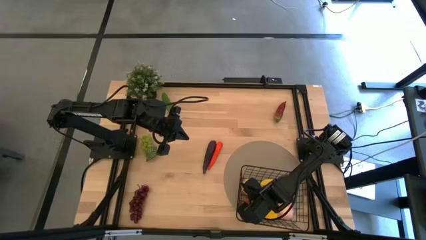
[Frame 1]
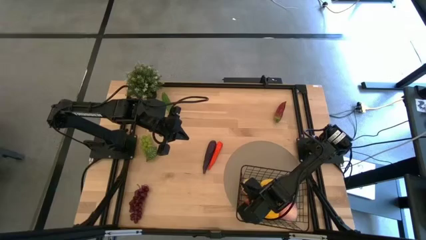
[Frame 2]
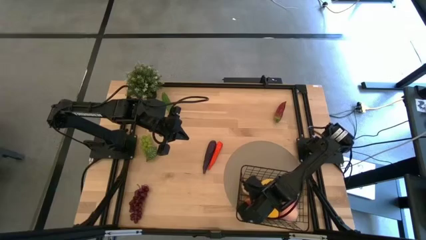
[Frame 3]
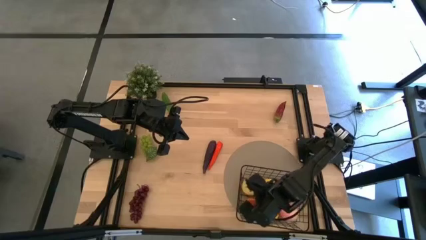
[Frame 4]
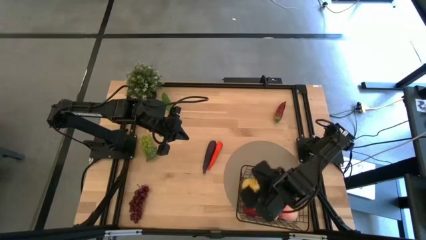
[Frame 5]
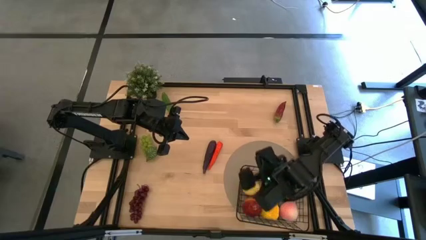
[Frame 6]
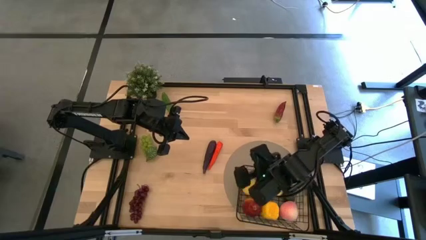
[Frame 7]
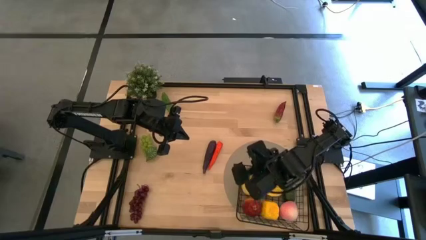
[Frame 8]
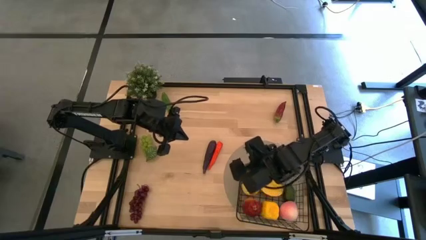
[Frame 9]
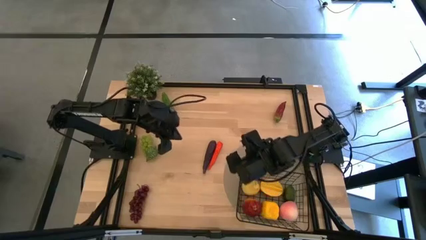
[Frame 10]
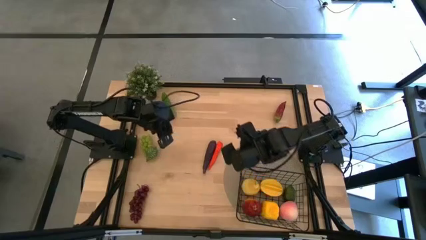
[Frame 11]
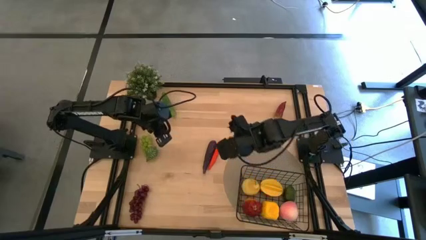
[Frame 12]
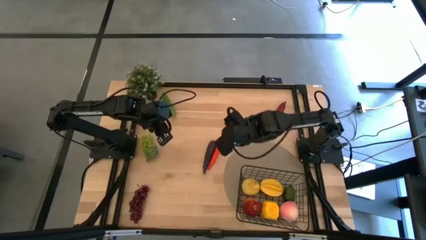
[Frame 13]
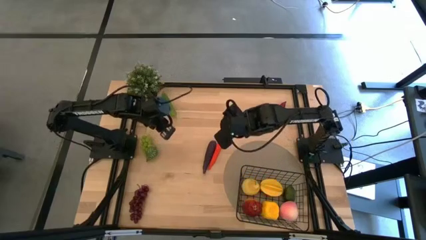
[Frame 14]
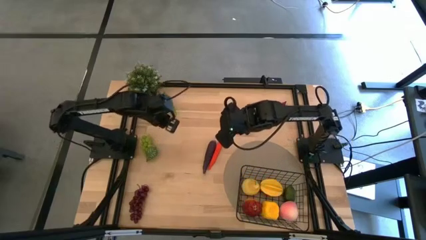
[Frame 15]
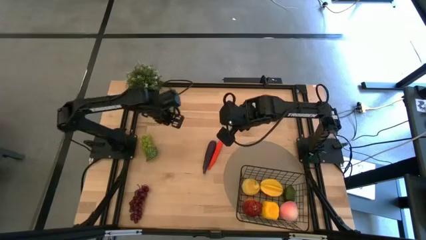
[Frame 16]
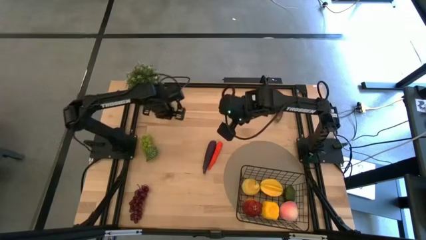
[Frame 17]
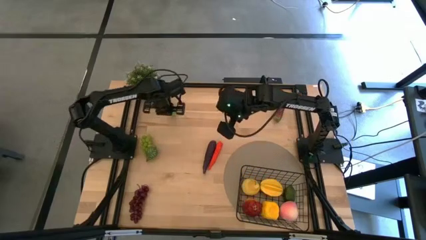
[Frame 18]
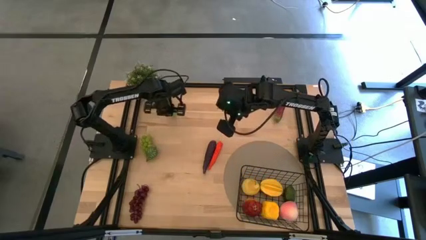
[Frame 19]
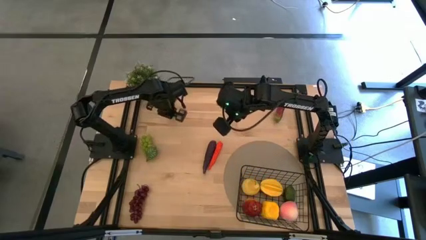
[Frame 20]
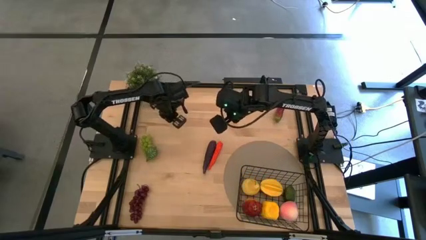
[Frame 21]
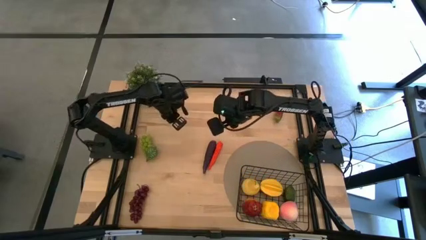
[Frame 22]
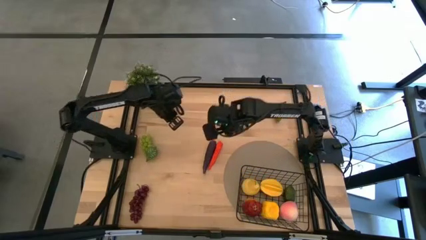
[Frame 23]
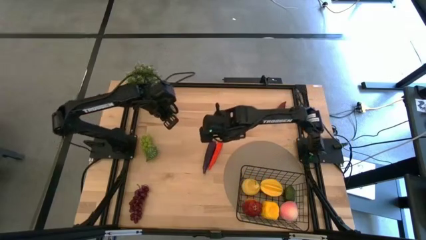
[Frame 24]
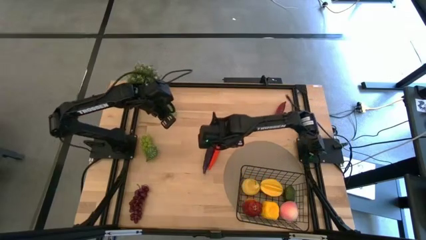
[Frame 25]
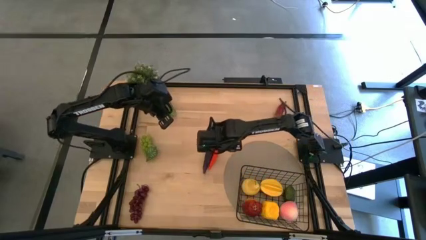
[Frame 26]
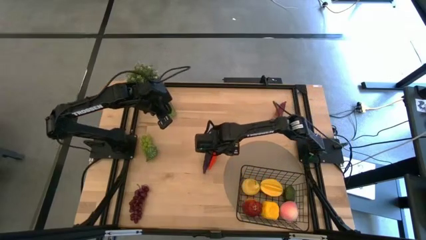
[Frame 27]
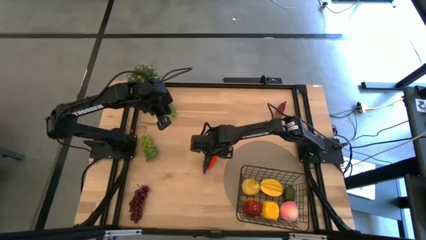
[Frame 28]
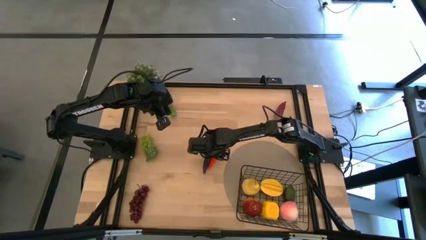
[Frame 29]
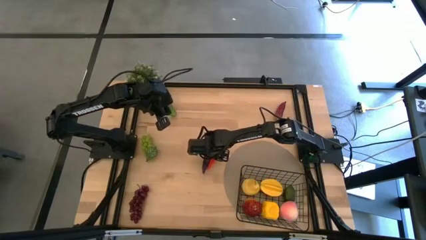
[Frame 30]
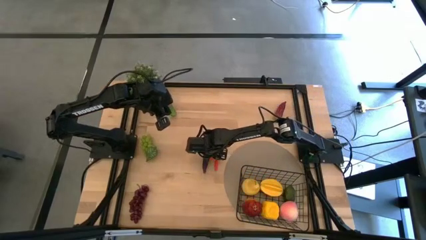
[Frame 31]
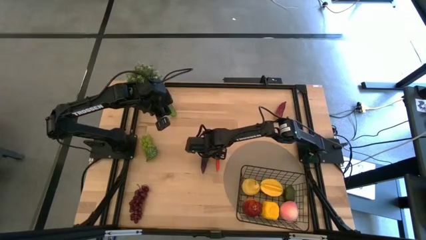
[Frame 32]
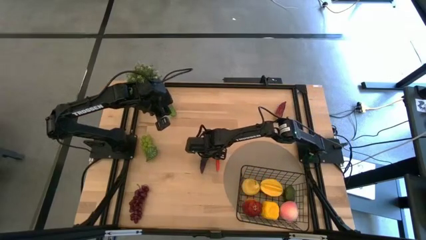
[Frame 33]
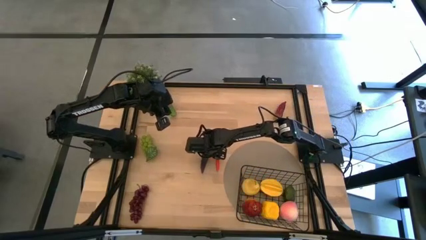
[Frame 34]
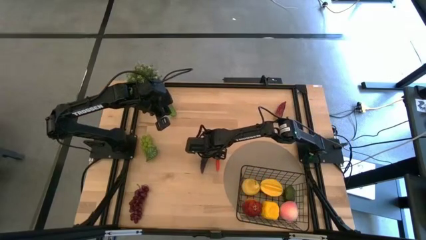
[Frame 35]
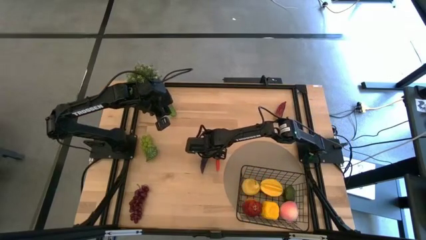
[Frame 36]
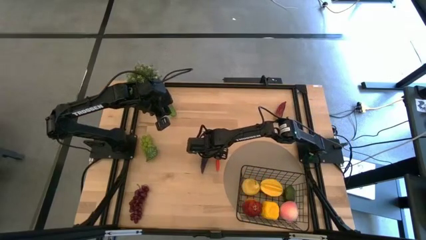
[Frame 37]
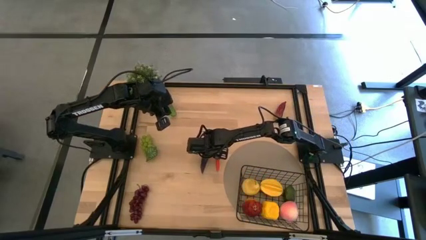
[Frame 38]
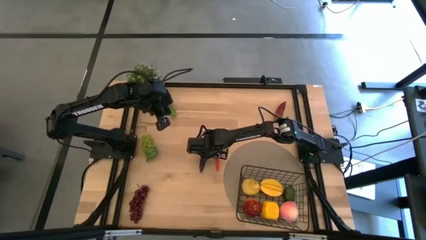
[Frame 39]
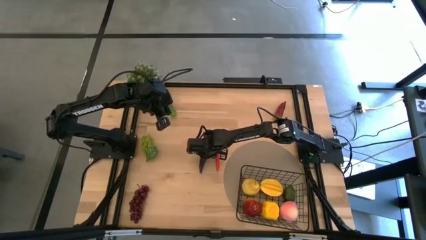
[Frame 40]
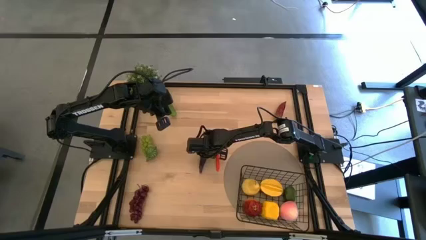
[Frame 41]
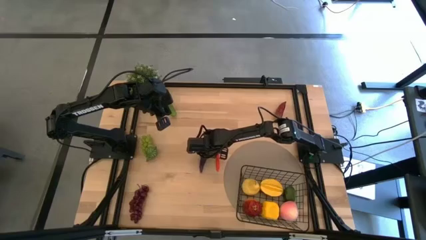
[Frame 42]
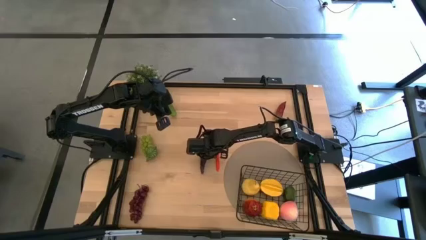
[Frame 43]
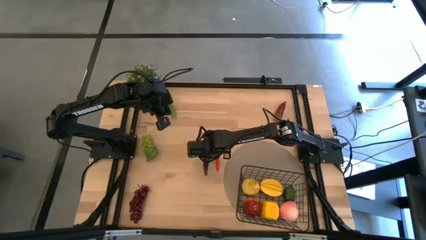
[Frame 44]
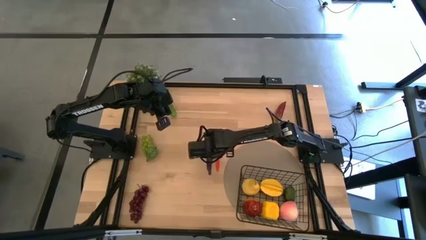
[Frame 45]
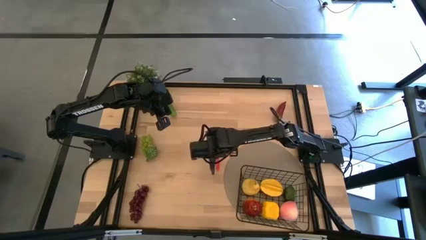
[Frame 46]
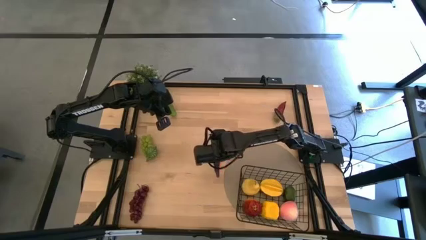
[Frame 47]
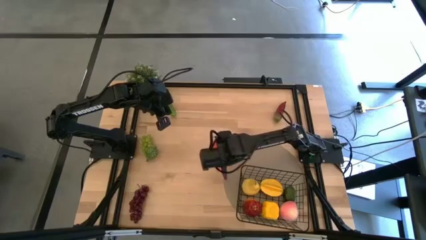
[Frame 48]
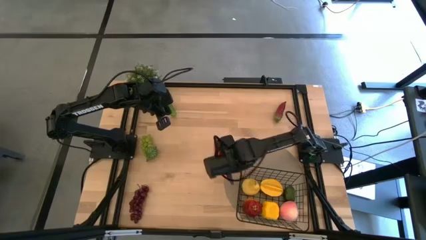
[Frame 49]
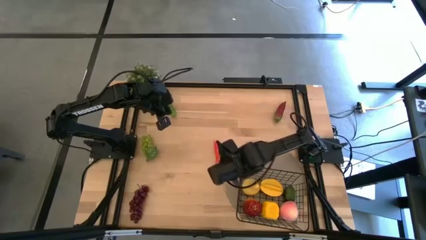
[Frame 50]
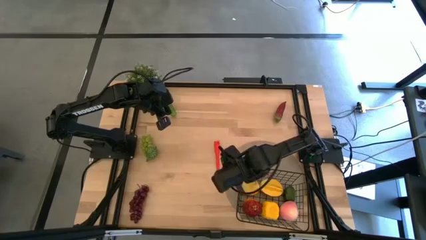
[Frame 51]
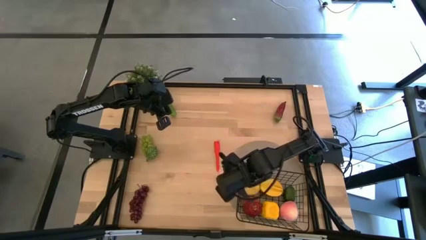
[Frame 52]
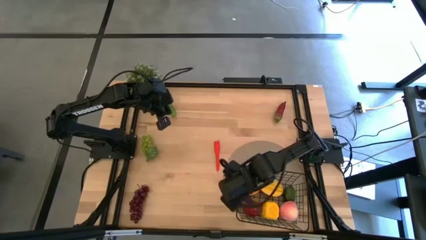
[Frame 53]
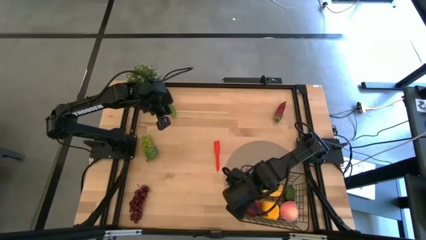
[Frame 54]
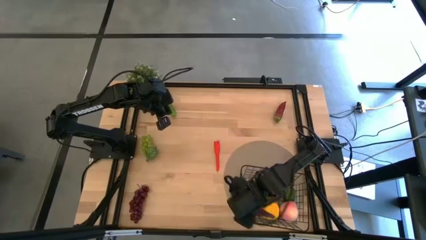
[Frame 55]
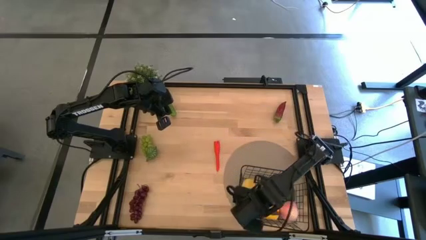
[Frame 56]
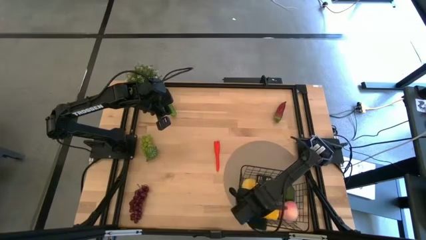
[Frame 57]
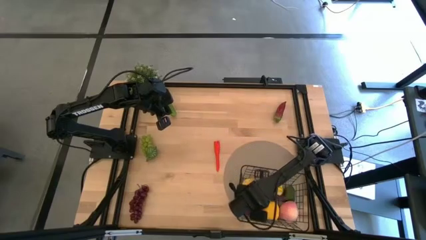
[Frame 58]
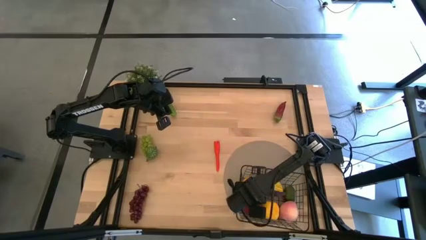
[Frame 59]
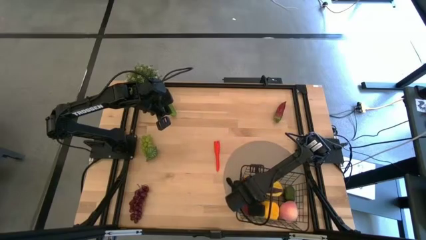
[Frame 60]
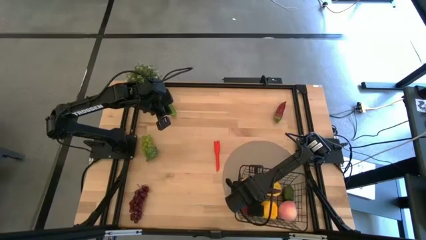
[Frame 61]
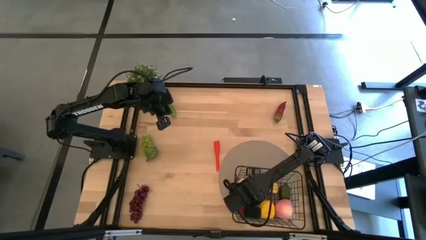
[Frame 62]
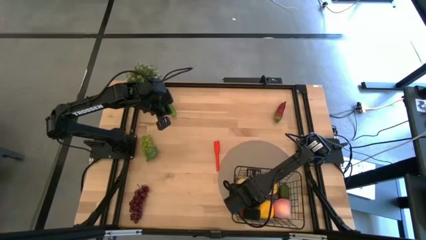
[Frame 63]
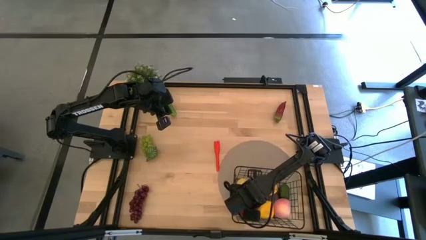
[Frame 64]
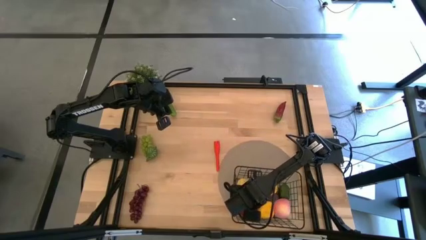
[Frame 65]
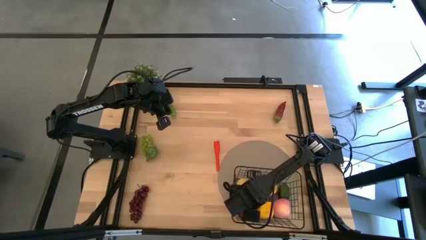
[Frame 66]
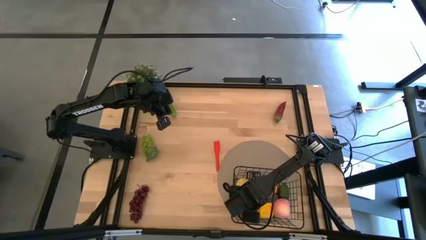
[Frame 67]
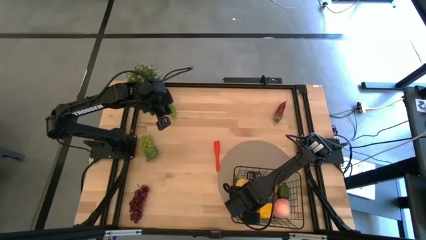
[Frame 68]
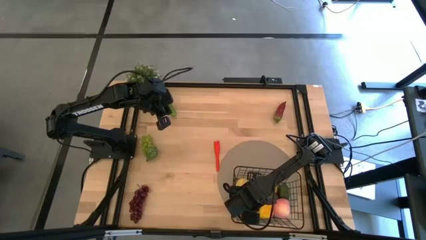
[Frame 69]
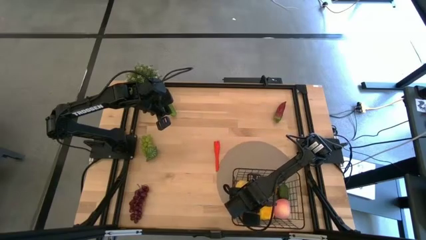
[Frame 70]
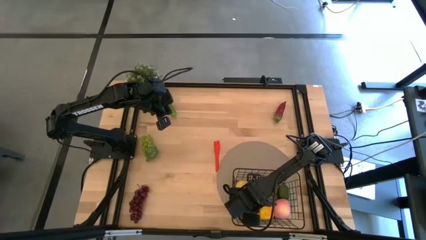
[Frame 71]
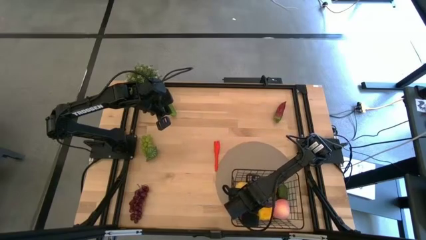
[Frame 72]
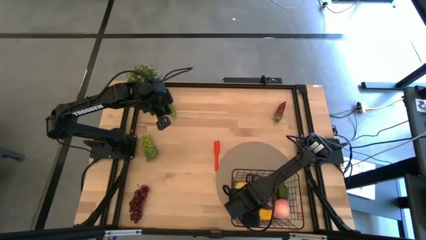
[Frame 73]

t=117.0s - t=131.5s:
Task: Build produce basket
Put the violet eggplant into the wire basket

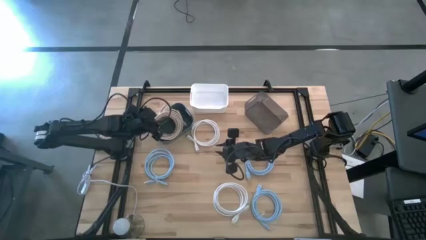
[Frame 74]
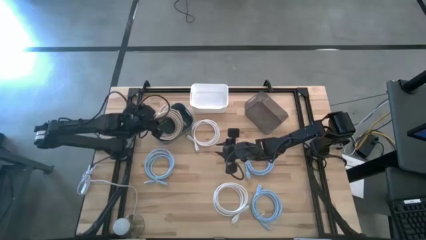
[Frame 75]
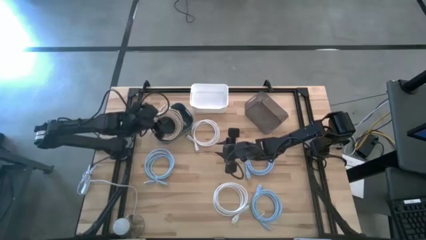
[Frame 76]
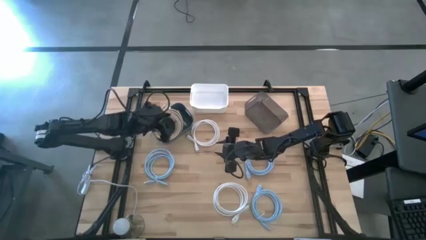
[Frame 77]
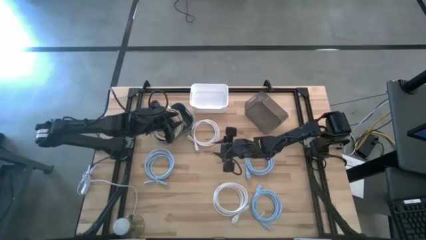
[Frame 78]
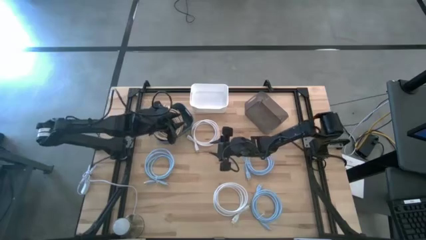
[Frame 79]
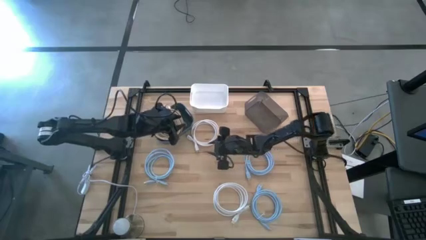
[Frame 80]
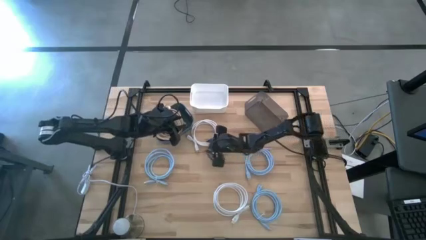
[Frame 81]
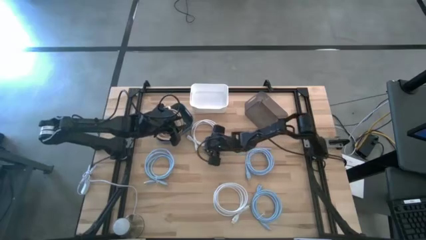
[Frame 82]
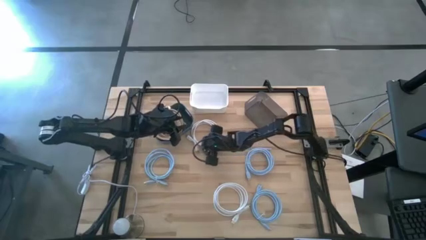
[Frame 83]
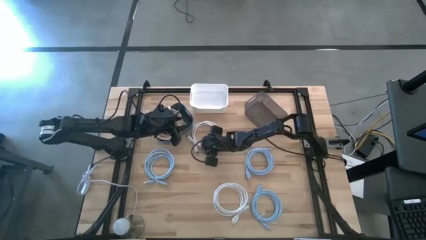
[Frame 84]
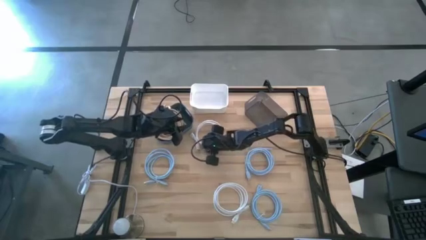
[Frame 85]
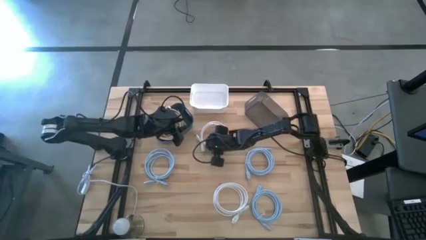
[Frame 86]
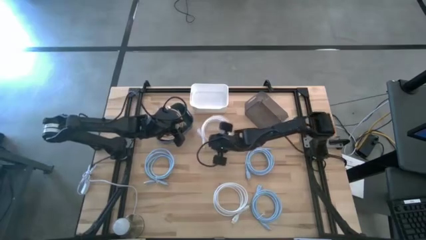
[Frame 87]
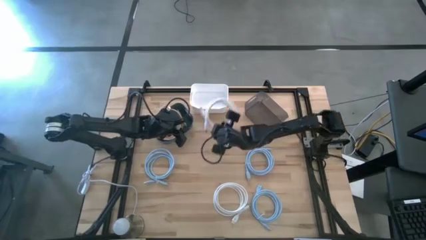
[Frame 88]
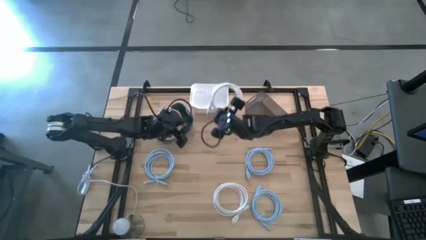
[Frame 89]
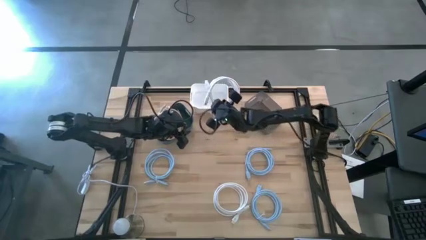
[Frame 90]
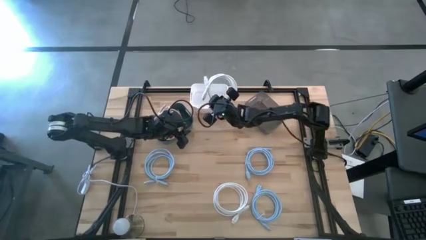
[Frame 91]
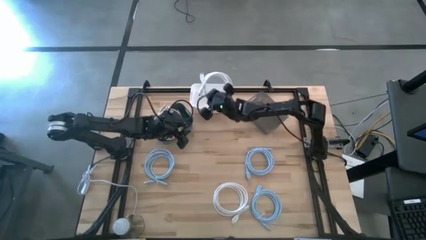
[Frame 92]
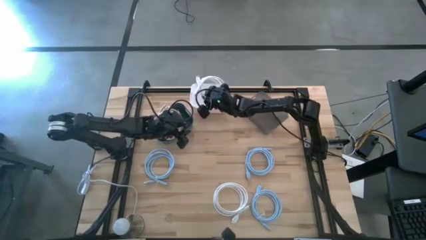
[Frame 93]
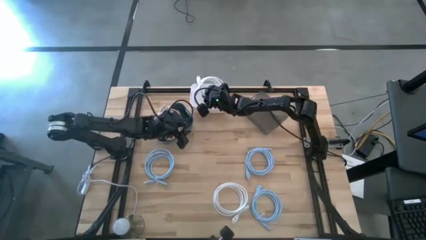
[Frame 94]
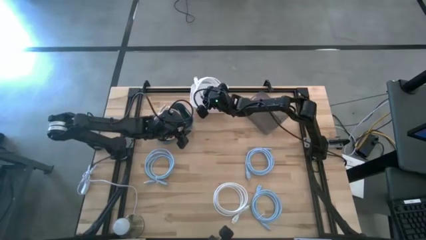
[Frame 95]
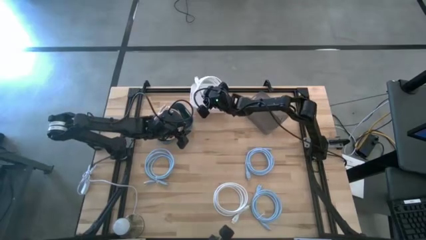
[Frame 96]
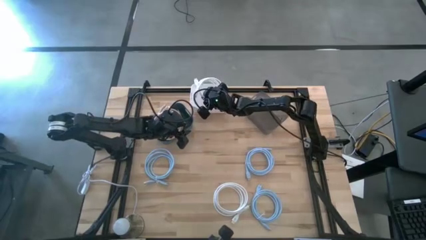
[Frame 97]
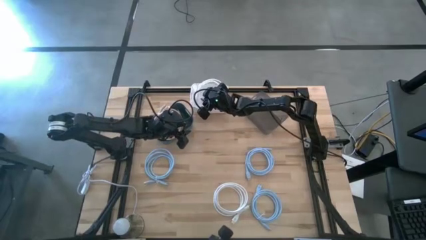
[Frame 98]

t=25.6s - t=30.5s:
Task: Sort HDMI cables
Put the top white HDMI cable into the white bin
